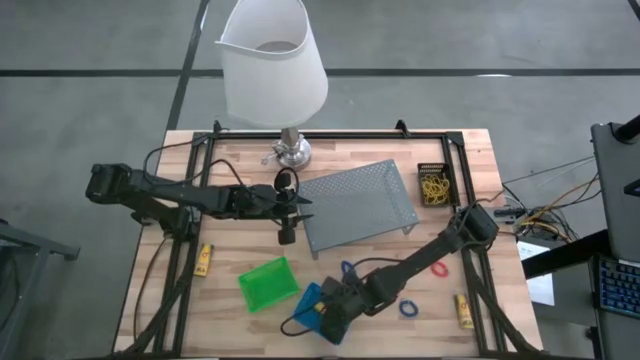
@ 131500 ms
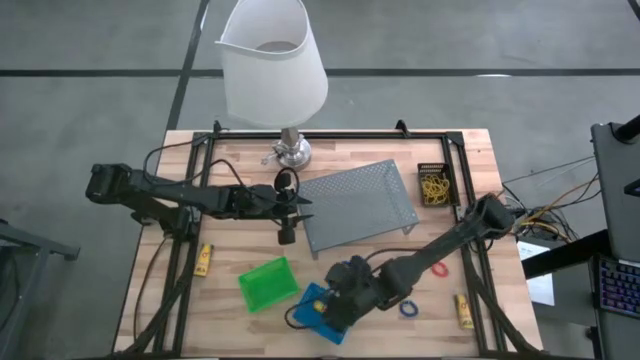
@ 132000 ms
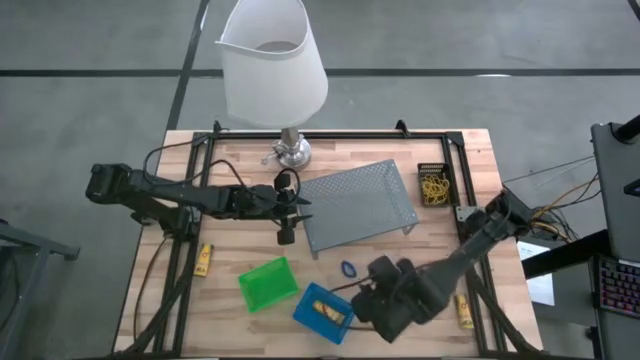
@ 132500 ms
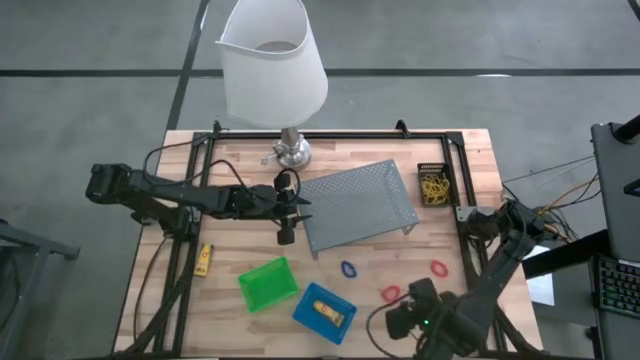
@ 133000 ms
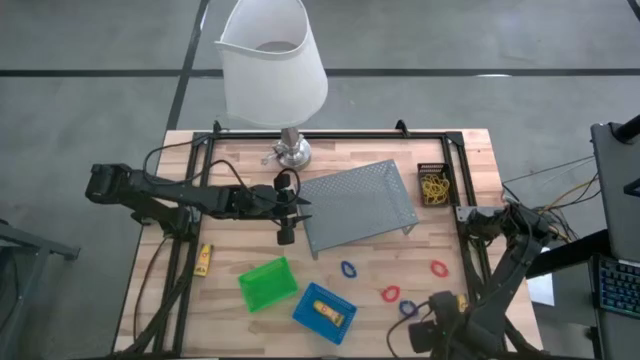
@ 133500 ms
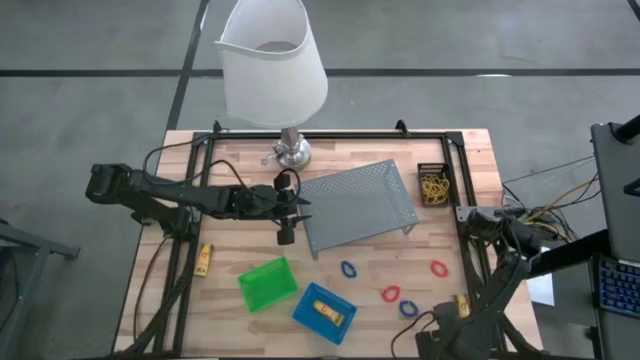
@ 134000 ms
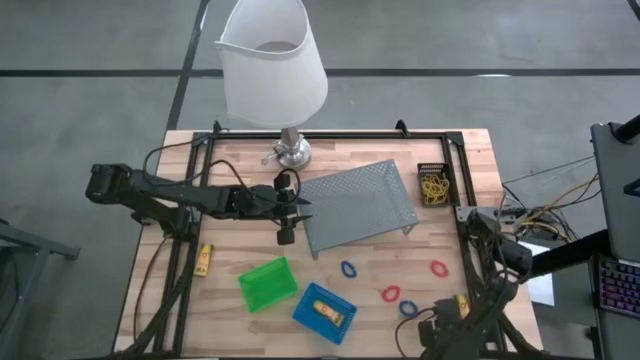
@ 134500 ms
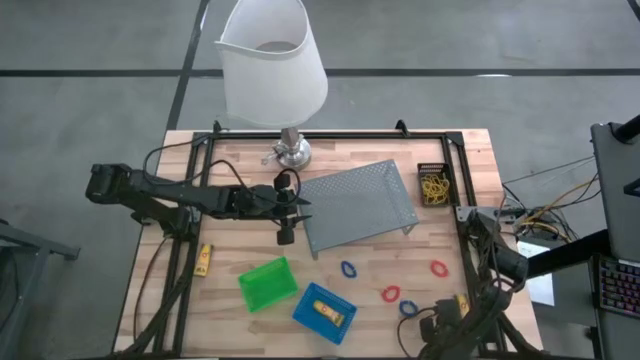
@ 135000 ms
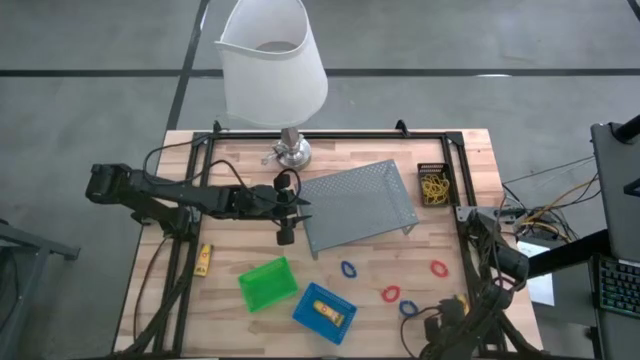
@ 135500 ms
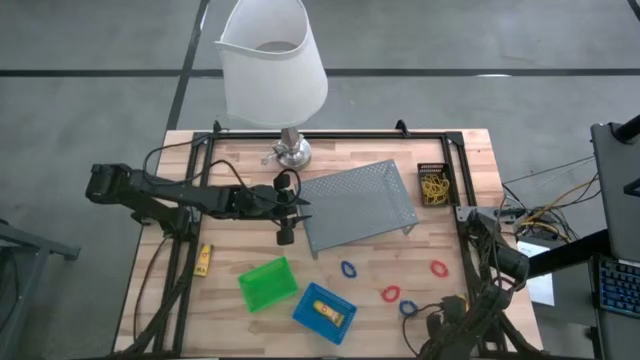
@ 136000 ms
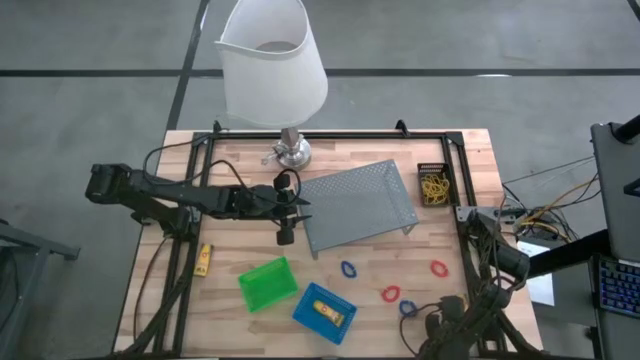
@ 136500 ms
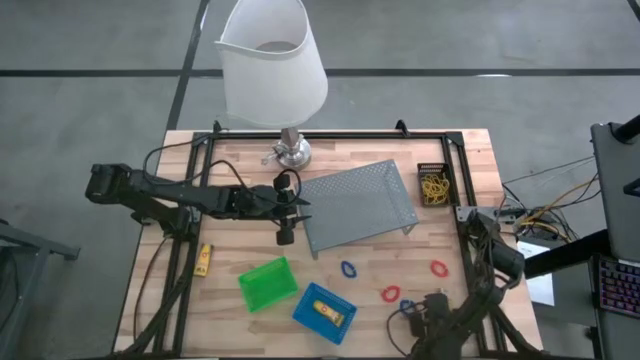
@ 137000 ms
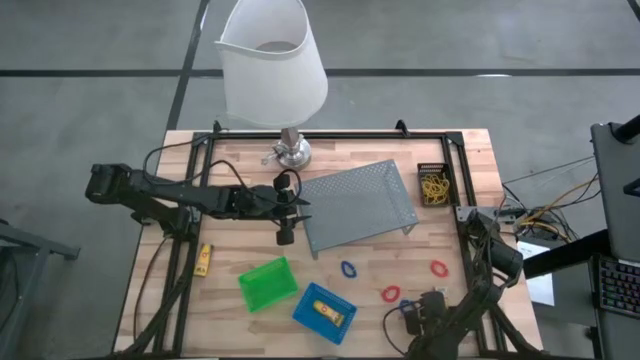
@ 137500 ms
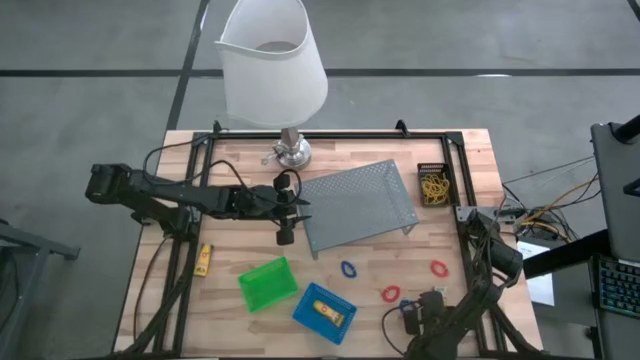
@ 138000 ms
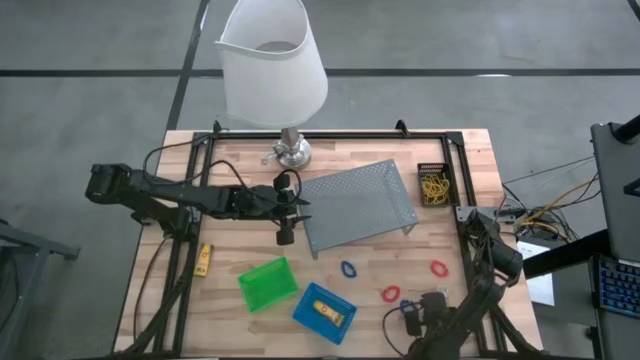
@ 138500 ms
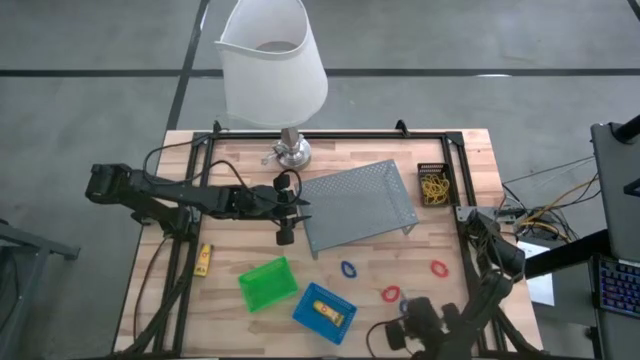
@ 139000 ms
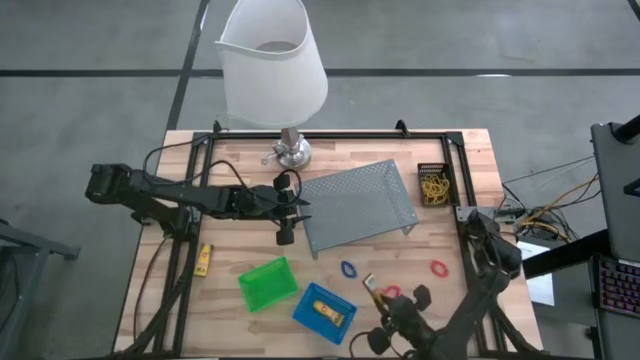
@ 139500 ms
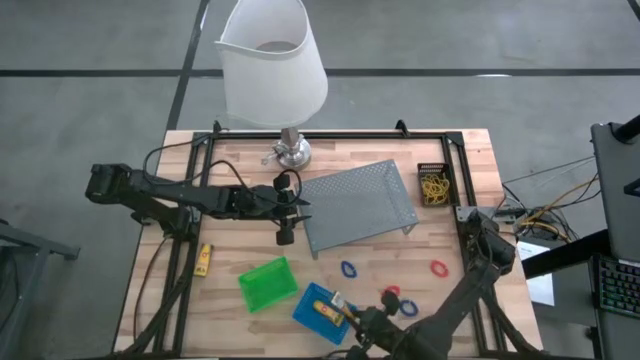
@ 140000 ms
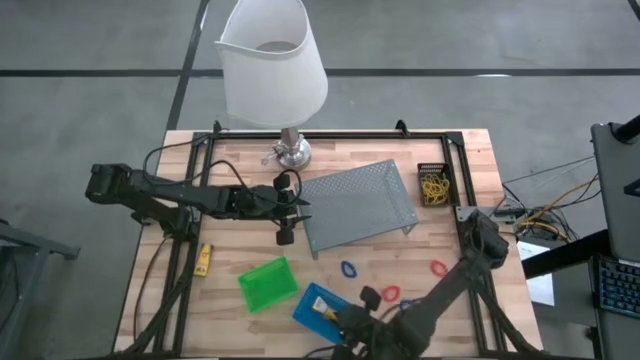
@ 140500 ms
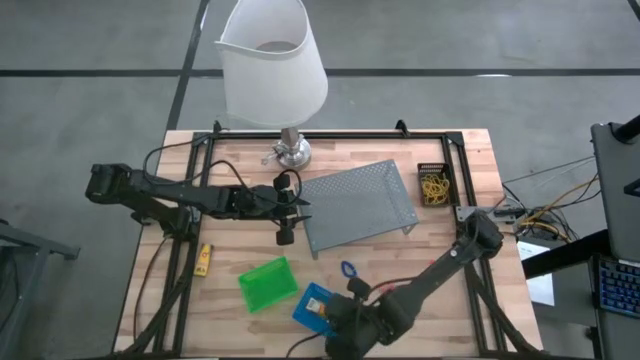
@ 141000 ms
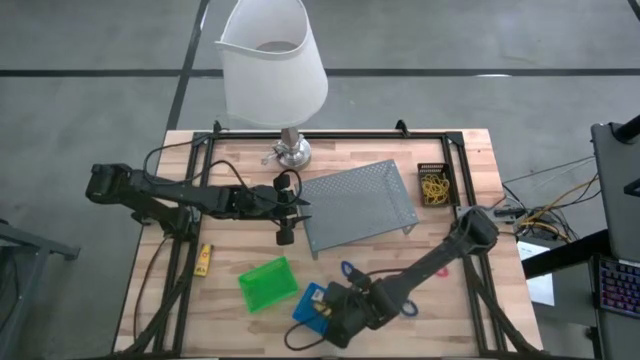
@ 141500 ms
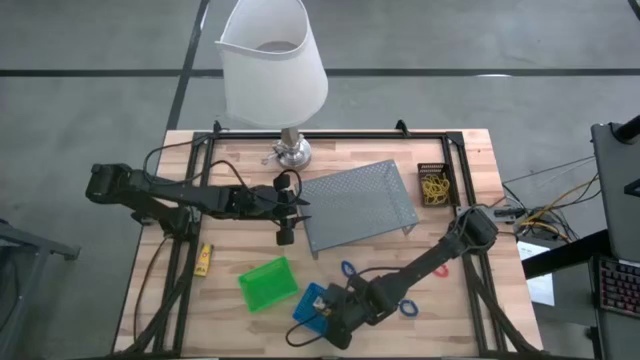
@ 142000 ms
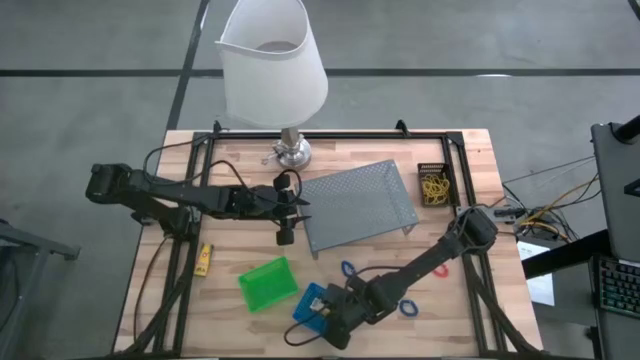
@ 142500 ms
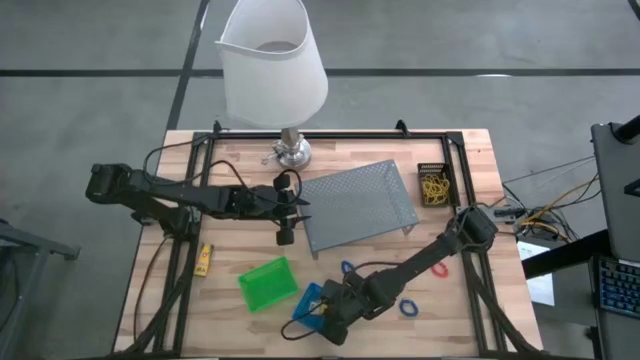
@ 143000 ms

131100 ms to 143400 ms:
Task: Pick & Place Office Desk Supplies
Put the crayon box into the blue basket

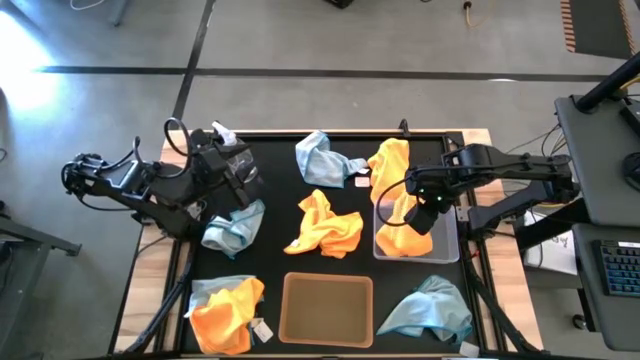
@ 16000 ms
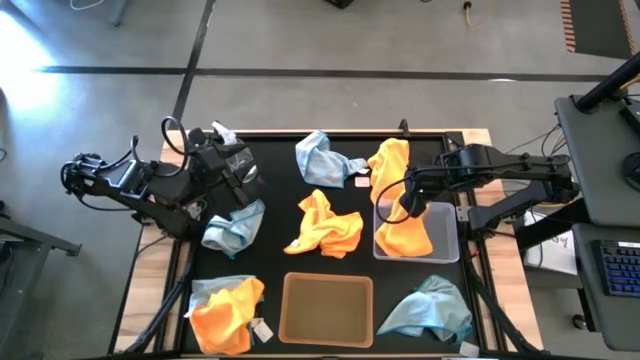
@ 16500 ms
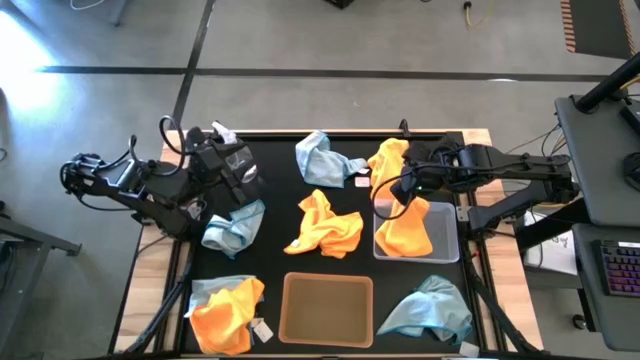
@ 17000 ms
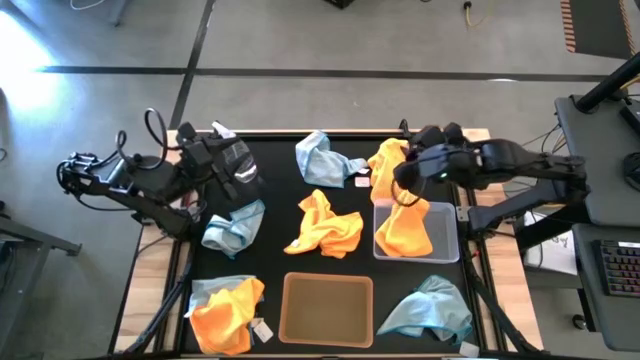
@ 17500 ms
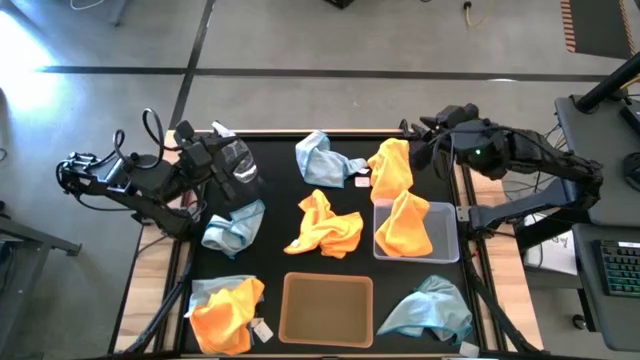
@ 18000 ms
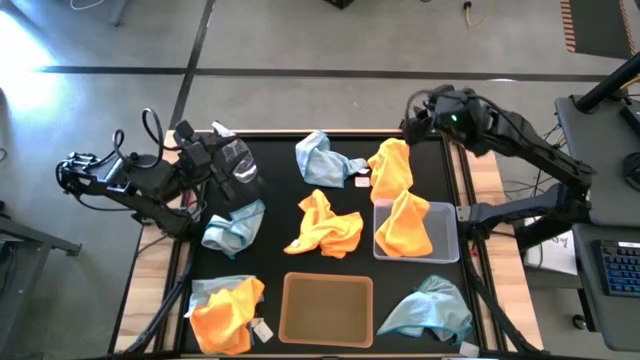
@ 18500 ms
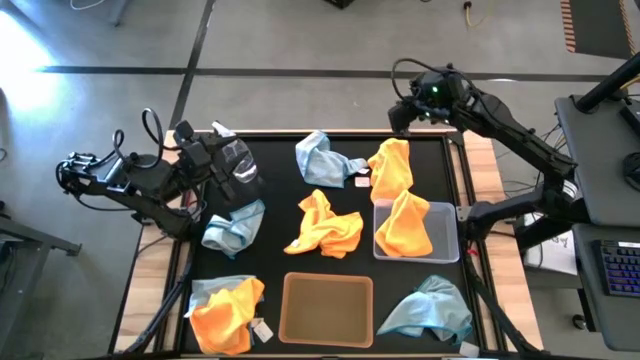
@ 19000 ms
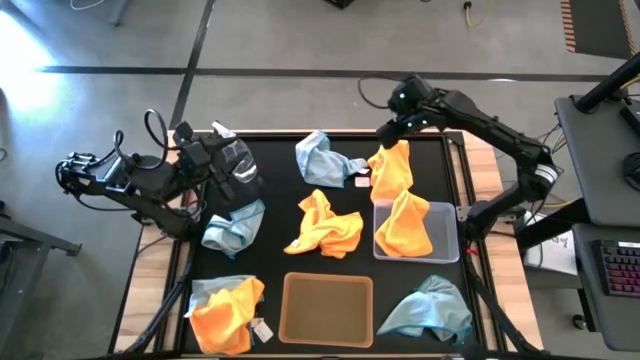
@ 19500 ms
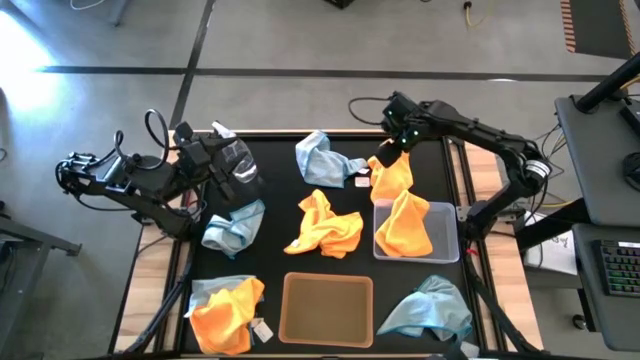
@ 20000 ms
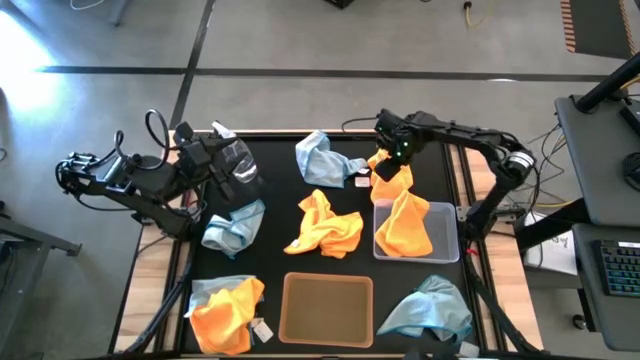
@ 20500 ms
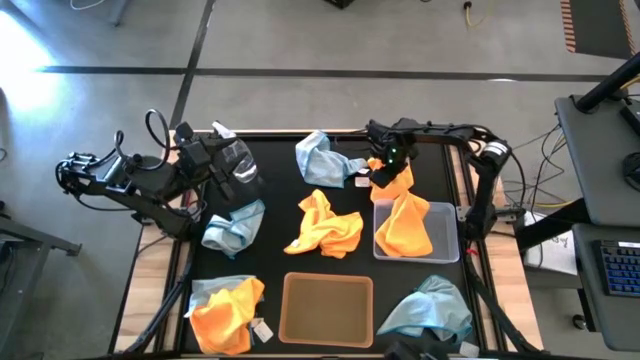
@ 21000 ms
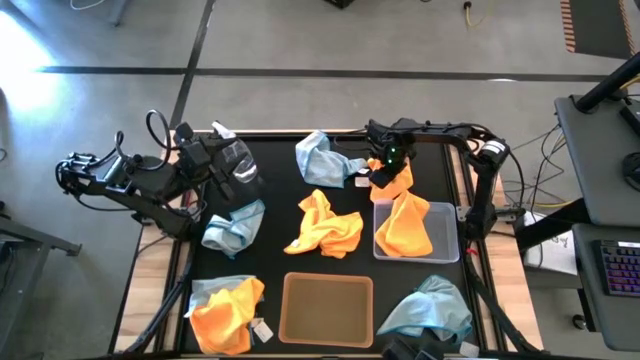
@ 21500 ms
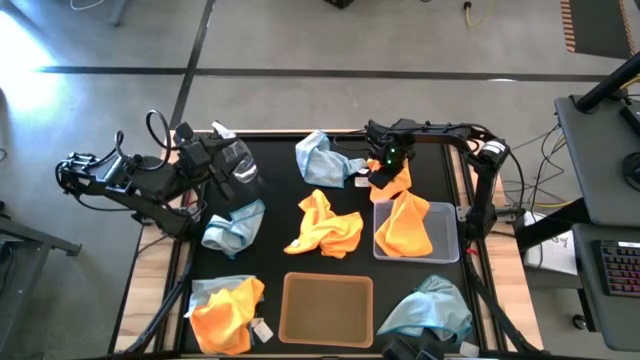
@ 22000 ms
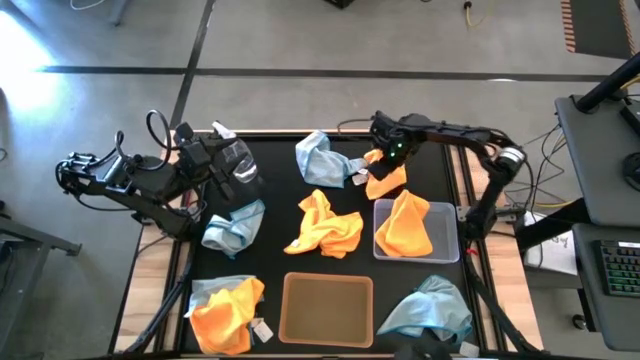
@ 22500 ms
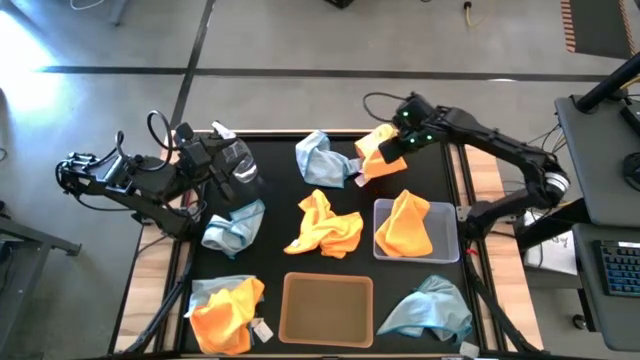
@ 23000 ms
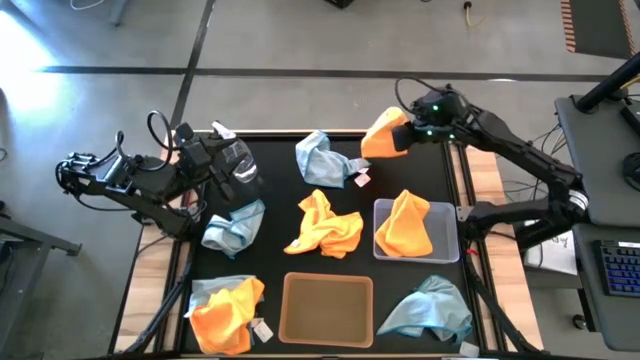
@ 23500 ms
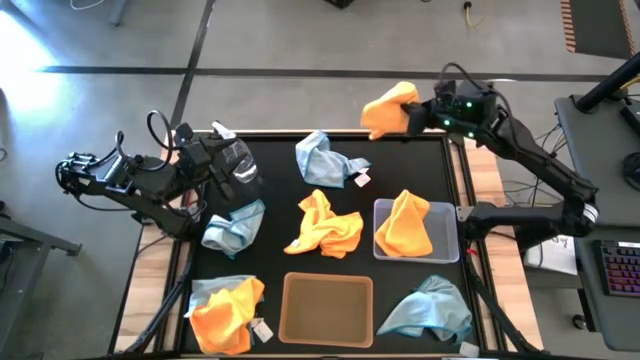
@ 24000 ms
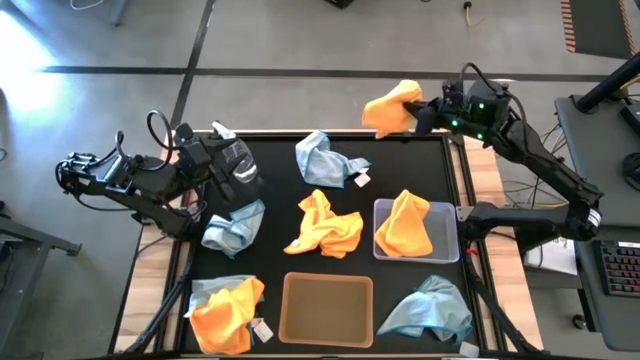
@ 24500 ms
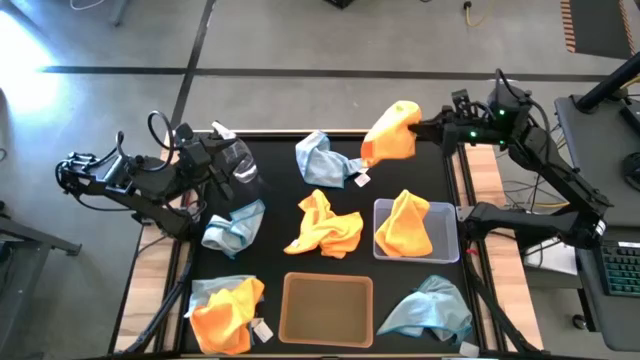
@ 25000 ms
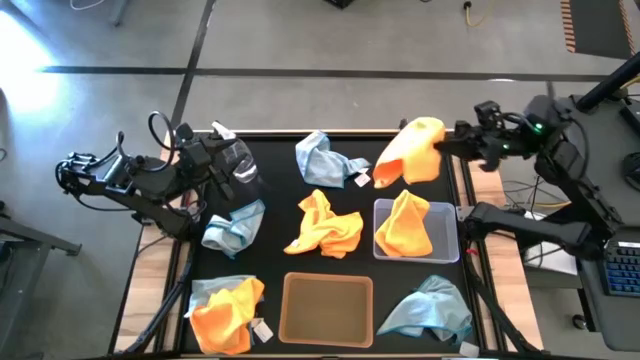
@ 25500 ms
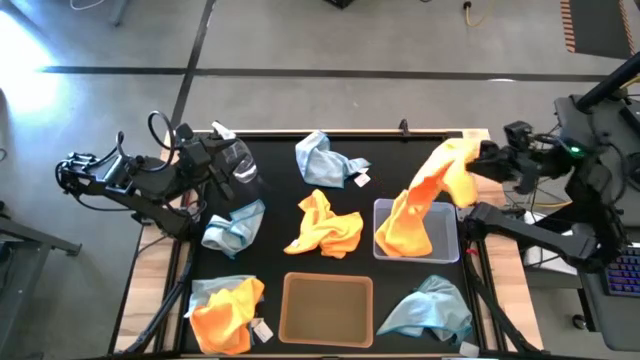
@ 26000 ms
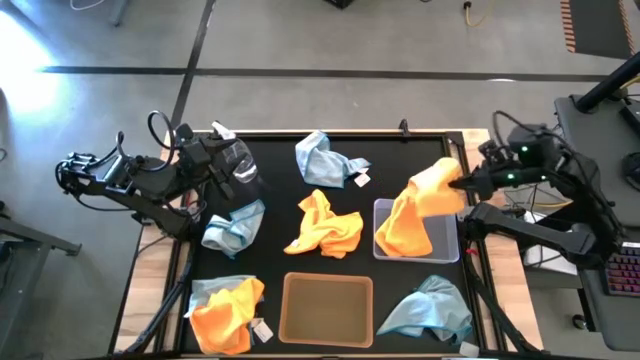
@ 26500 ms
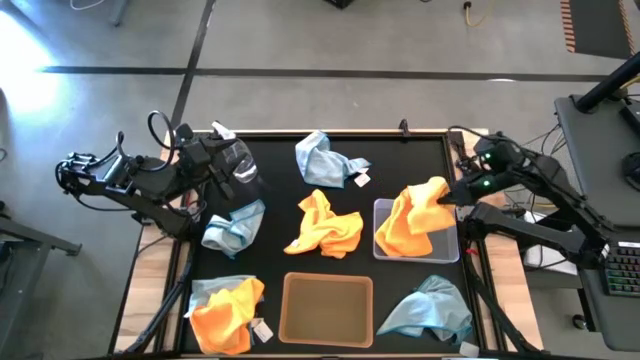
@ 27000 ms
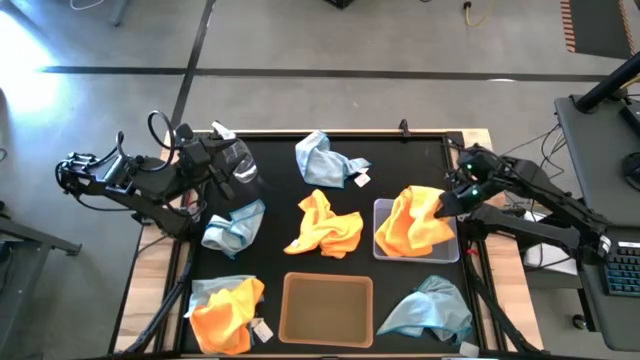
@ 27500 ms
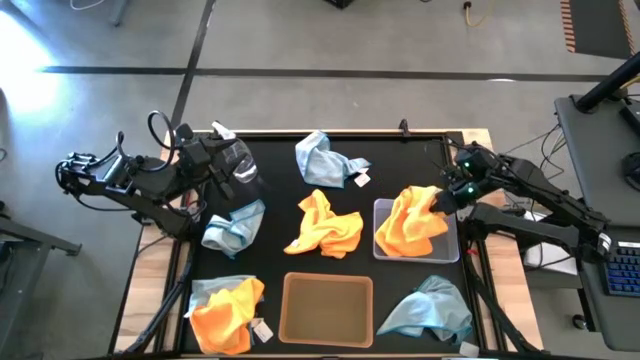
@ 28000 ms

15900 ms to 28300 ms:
Task: Sort microfiber towel by color & place in baskets
Put the top orange microfiber towel into the transparent bin
